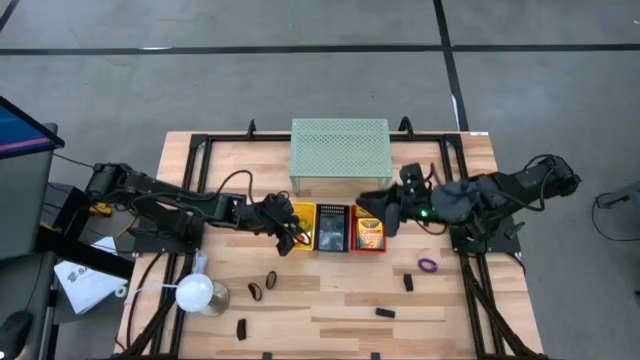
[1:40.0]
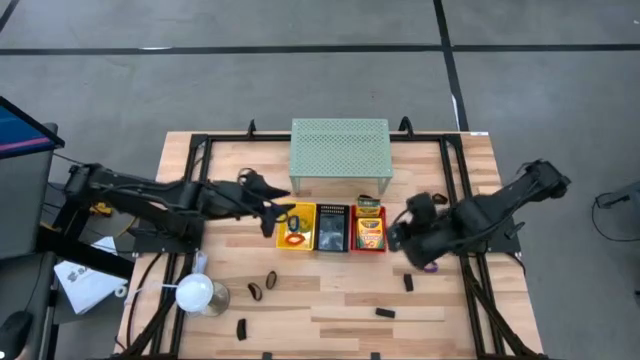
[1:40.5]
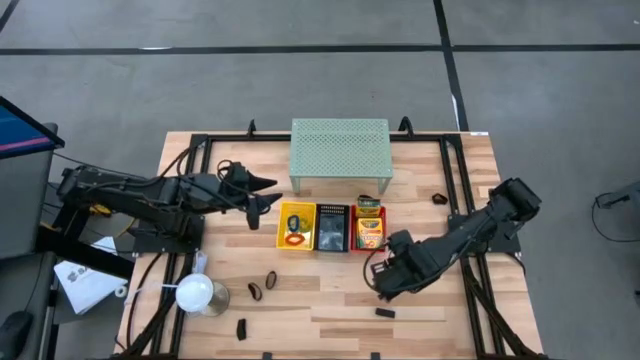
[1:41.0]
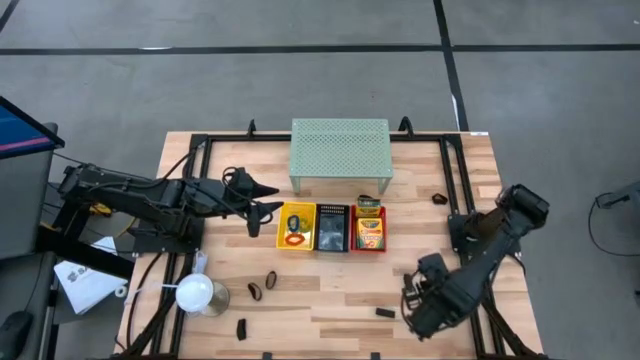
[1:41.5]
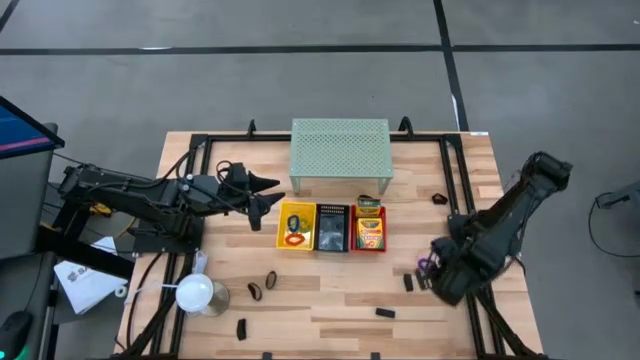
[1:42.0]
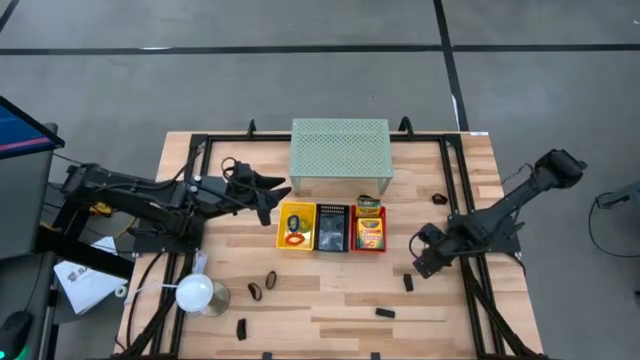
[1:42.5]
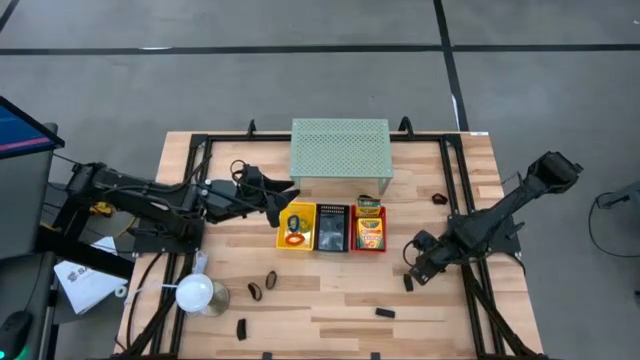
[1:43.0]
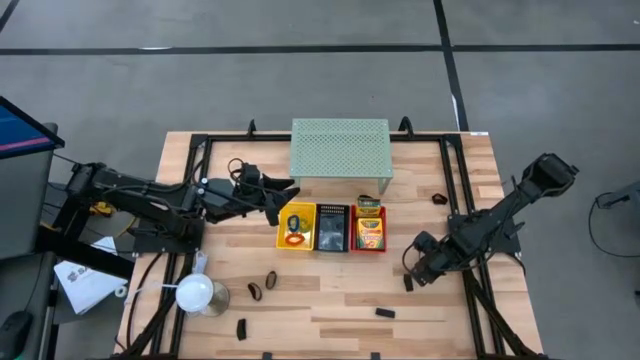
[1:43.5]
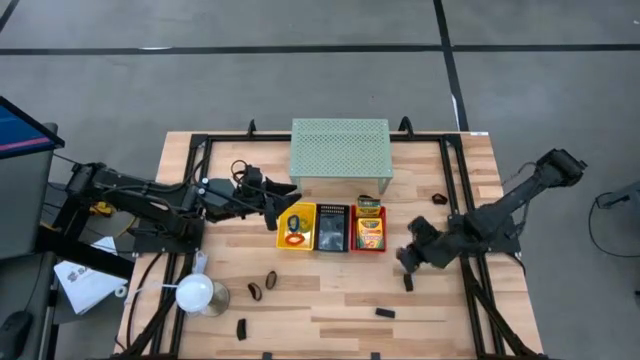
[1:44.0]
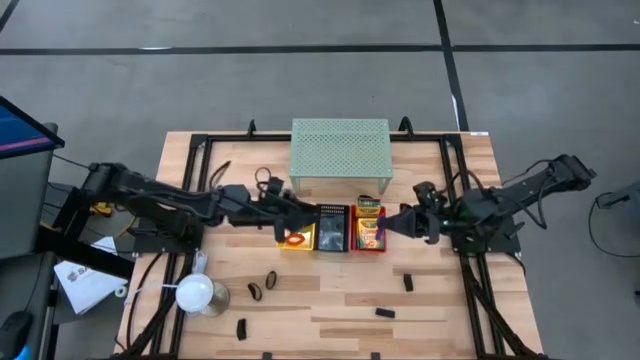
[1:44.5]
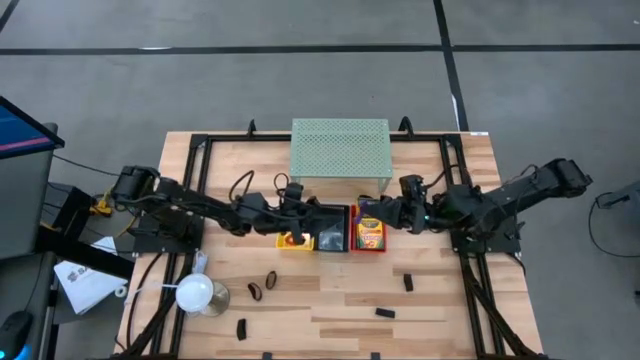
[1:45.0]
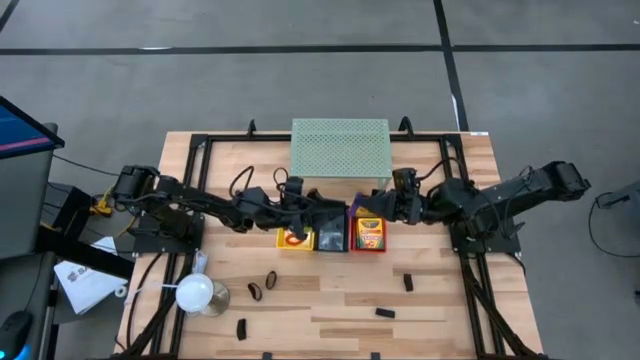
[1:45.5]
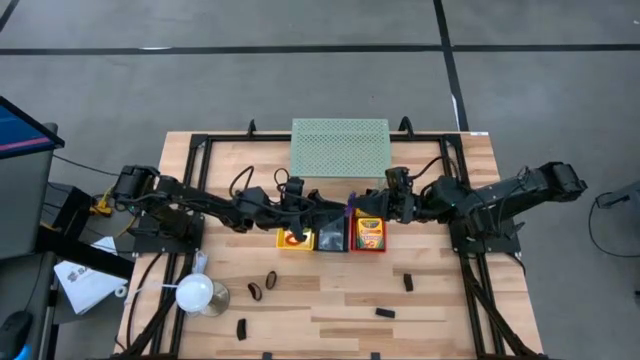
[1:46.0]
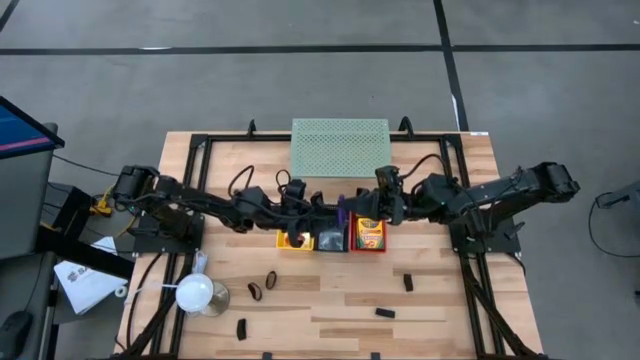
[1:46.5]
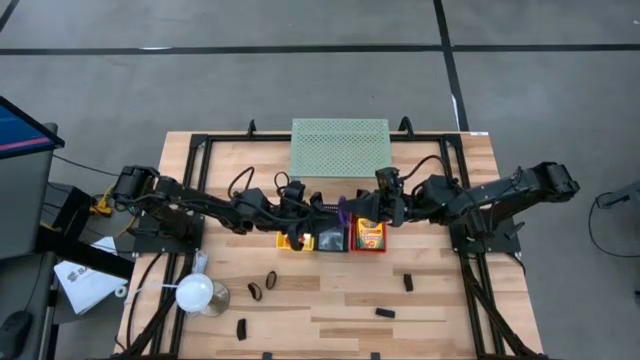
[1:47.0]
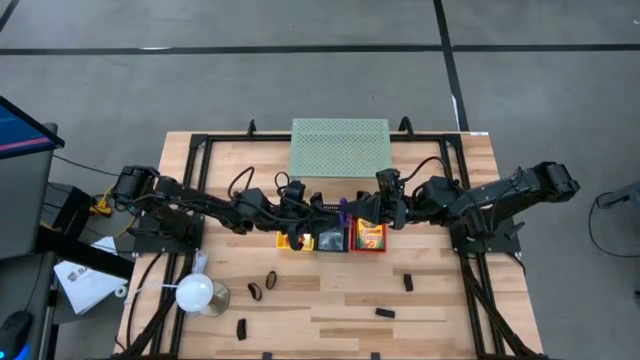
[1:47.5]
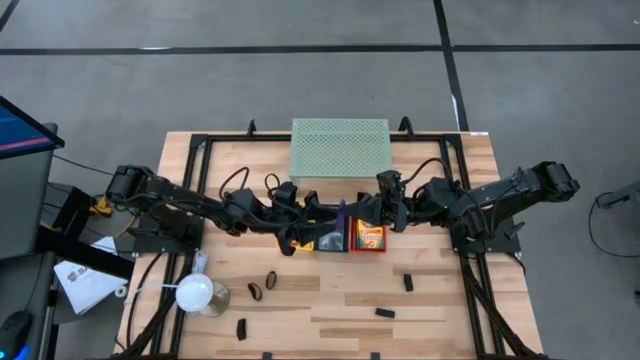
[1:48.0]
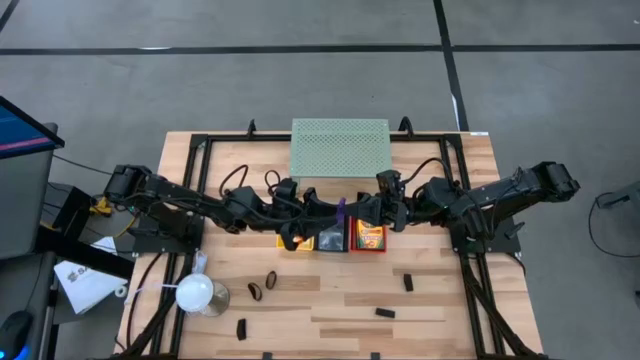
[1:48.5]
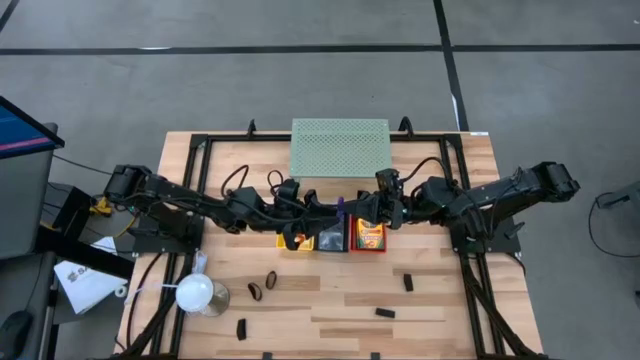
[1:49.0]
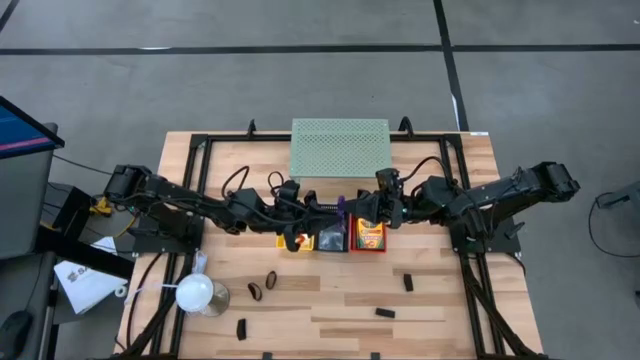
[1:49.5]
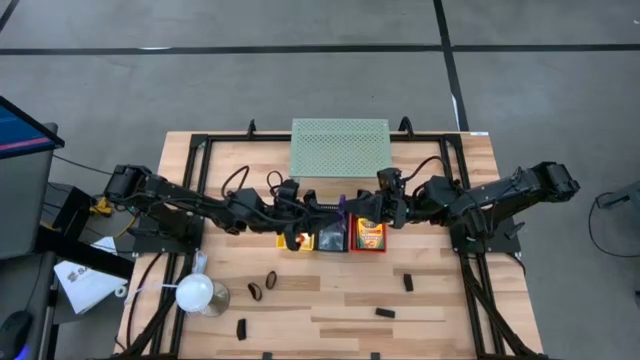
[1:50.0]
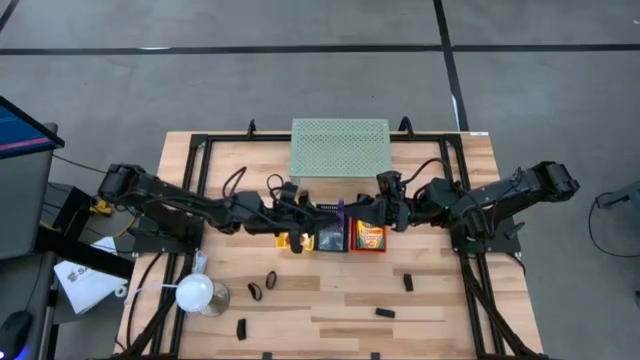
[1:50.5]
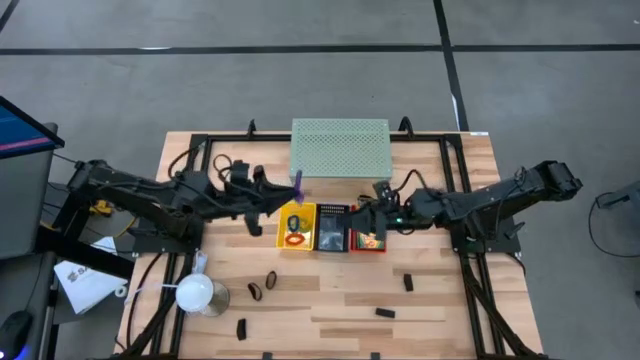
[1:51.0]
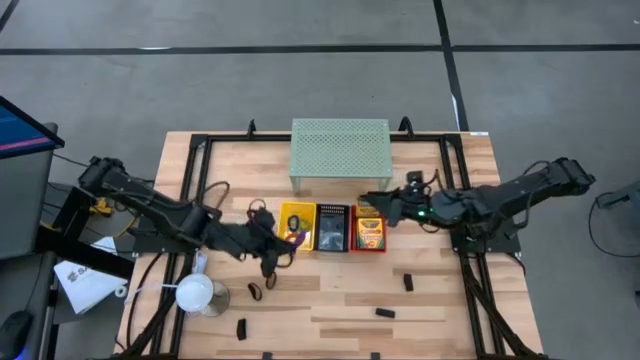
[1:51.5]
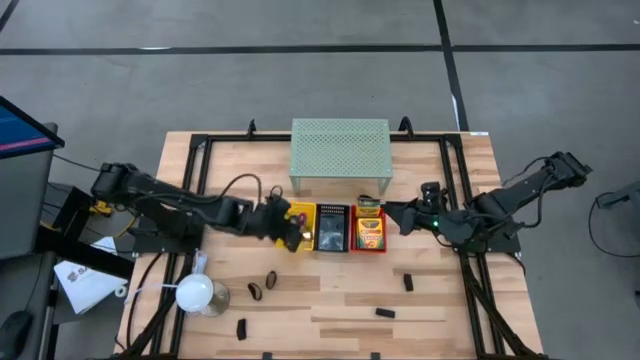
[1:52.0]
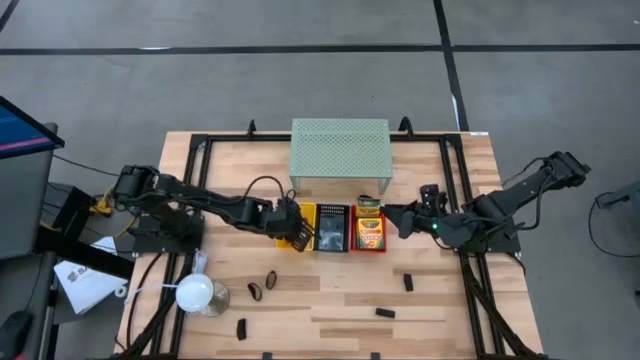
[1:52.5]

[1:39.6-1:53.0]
Task: Pick & Place Office Desk Supplies
Put the violet spring keychain into the yellow bin

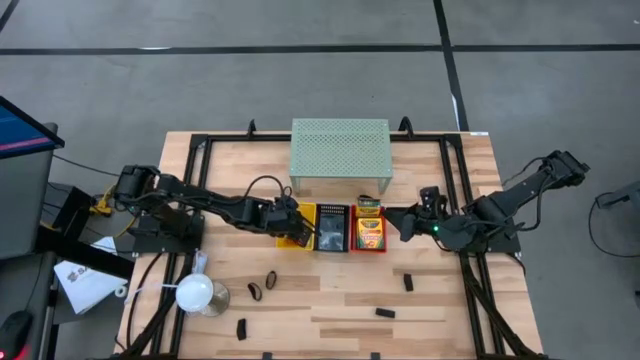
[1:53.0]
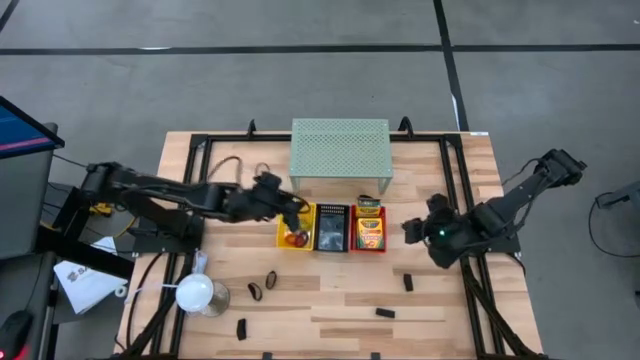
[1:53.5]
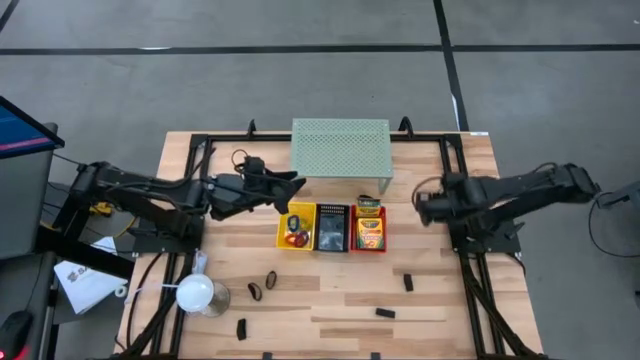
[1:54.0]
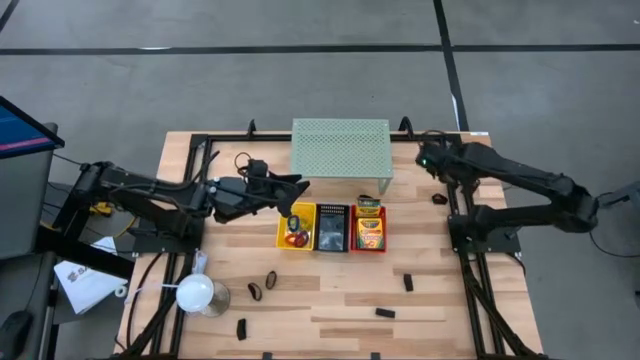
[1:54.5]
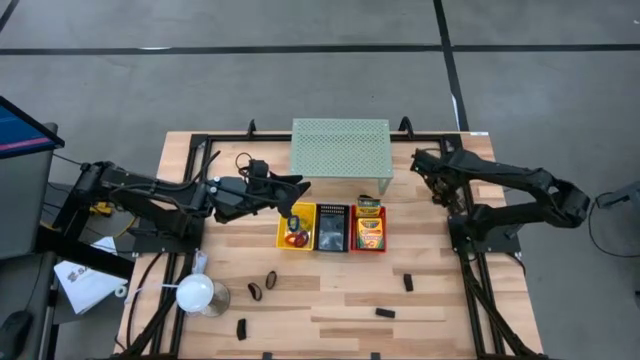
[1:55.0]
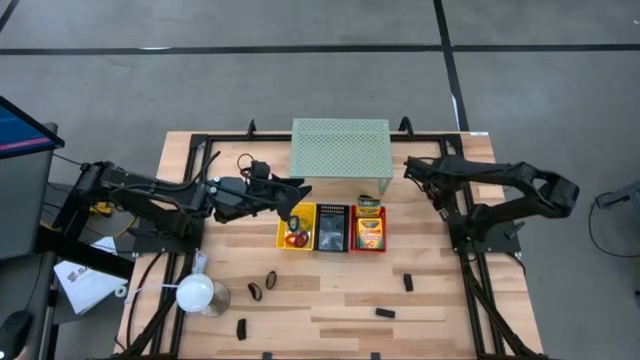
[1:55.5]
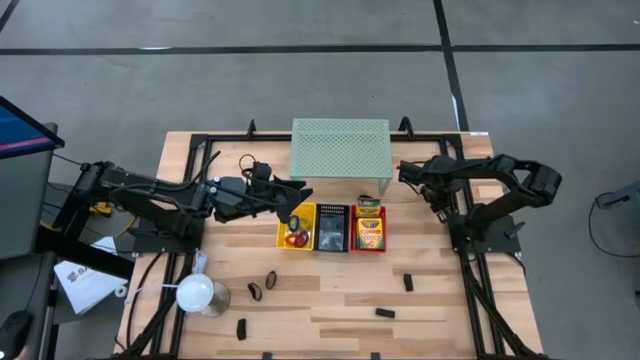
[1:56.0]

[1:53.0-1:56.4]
Put the black rubber band into the black bin

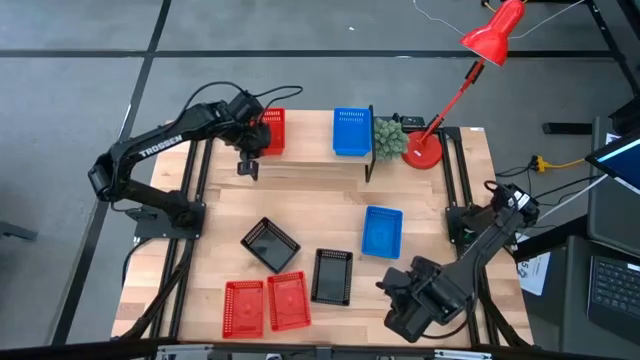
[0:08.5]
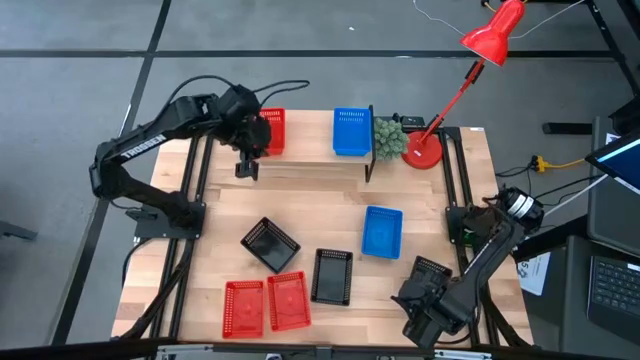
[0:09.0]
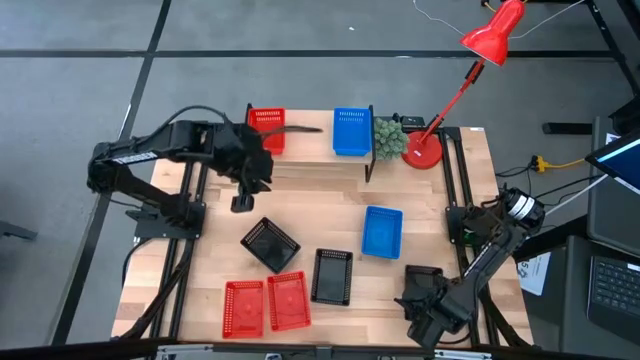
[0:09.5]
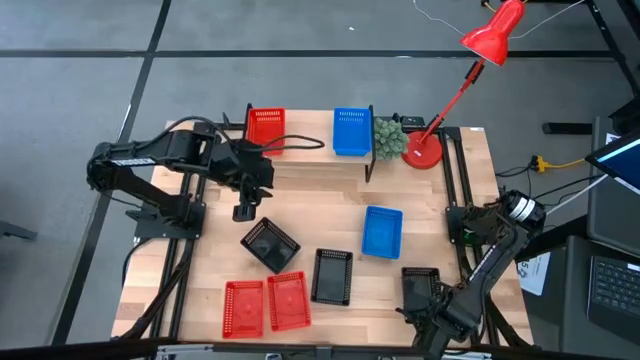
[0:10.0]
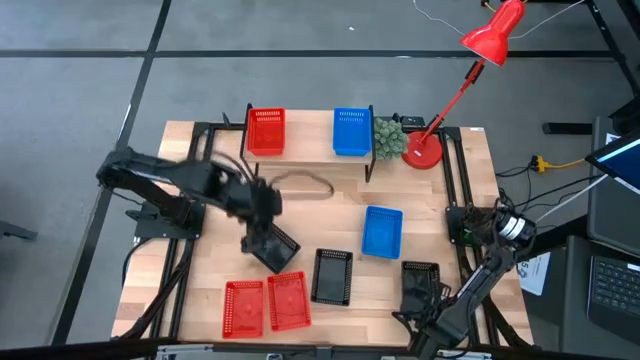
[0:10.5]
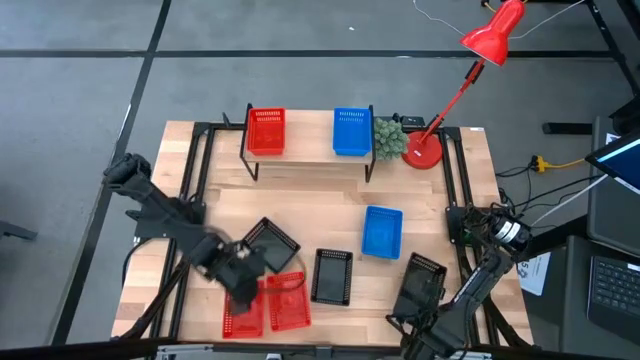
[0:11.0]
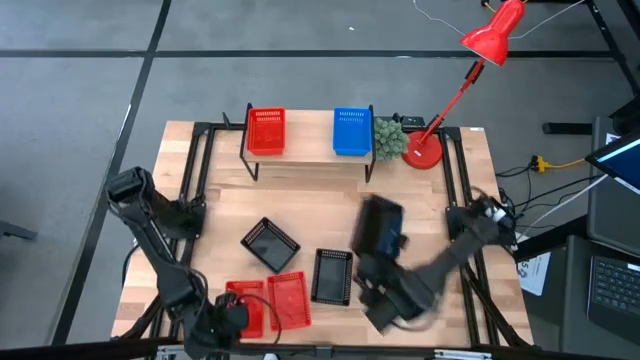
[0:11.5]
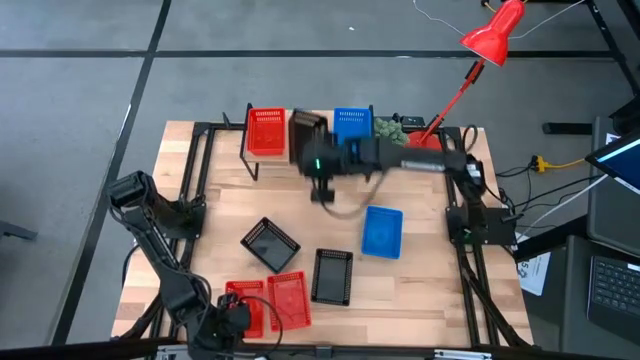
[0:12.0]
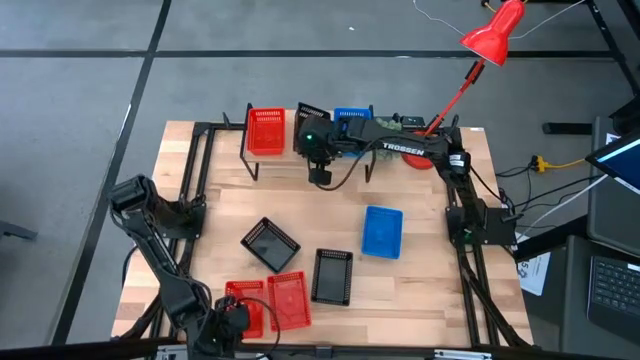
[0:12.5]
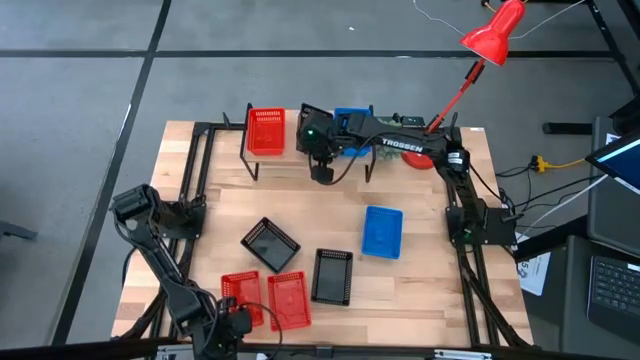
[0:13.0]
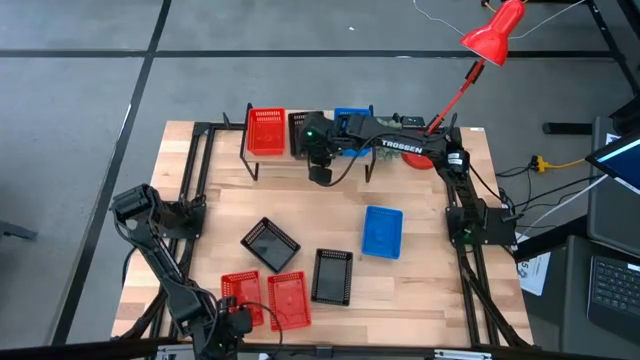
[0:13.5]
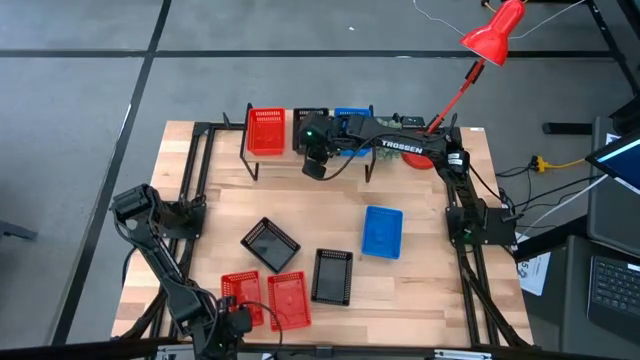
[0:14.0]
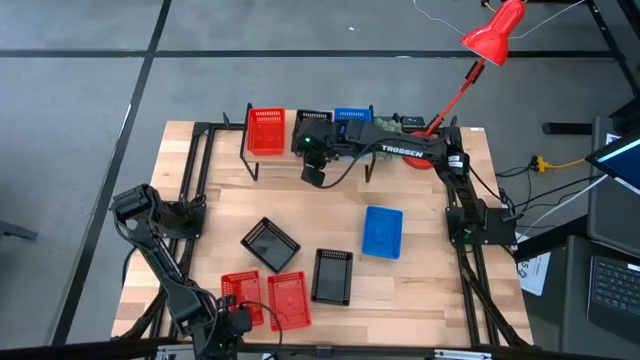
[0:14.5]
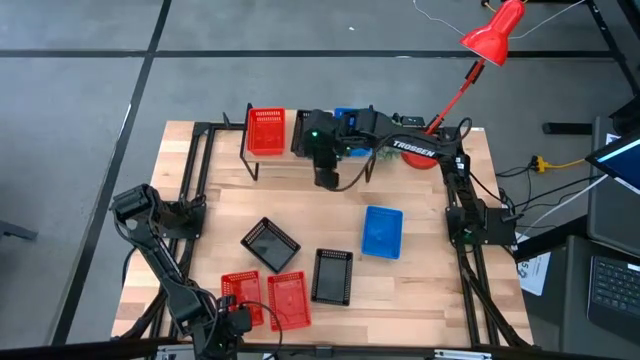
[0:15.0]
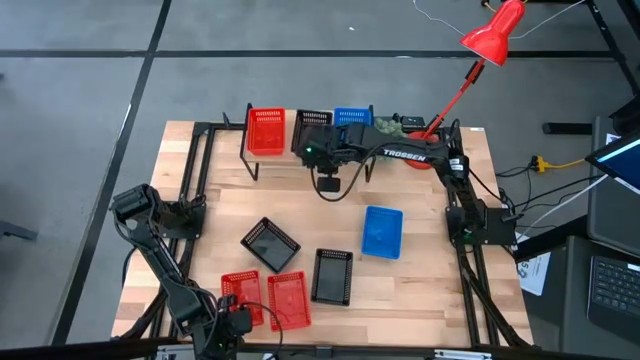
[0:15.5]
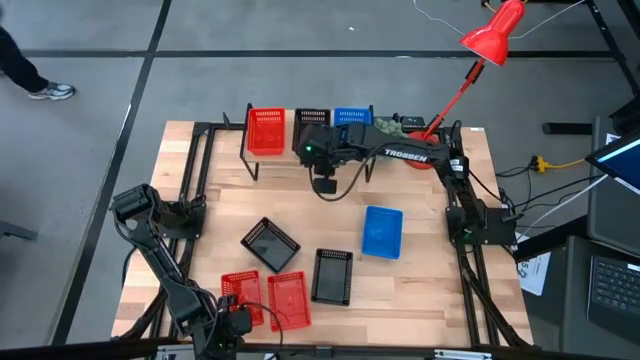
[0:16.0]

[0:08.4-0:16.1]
Task: Stack baskets on shelf by color
Put the left black bin on the shelf
